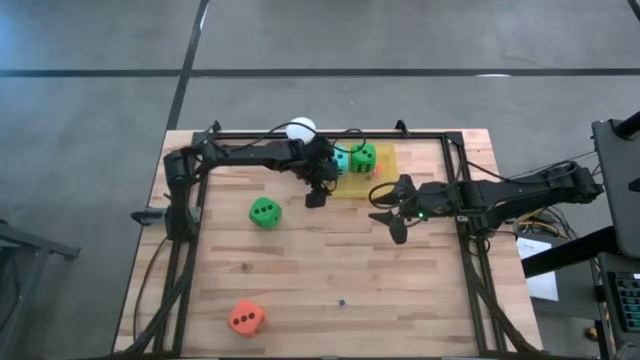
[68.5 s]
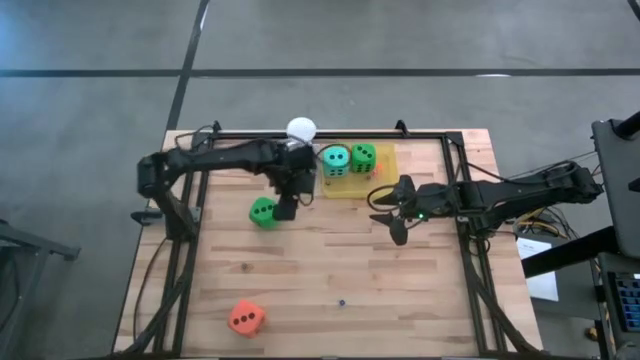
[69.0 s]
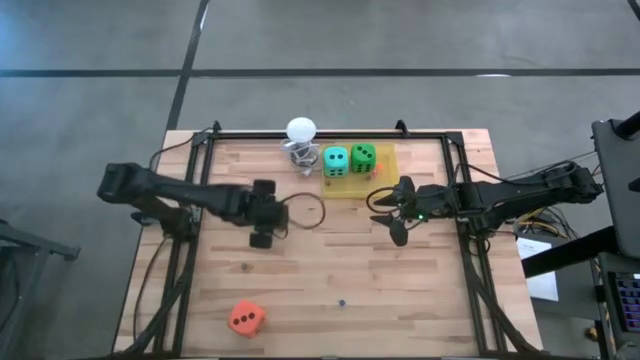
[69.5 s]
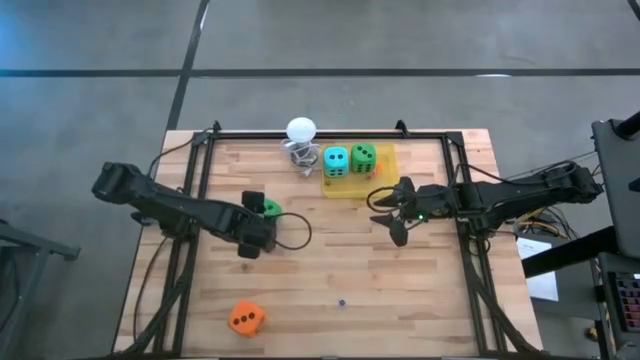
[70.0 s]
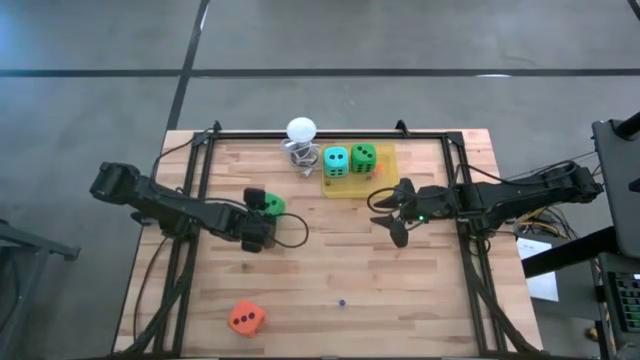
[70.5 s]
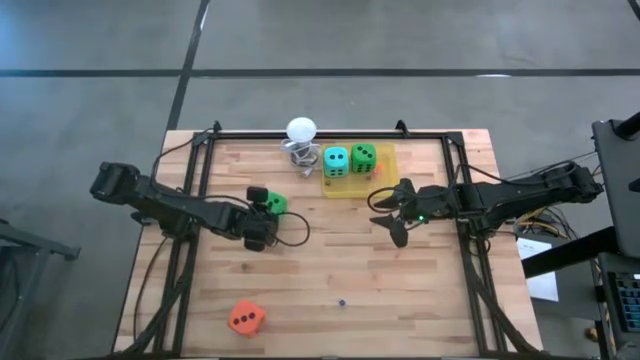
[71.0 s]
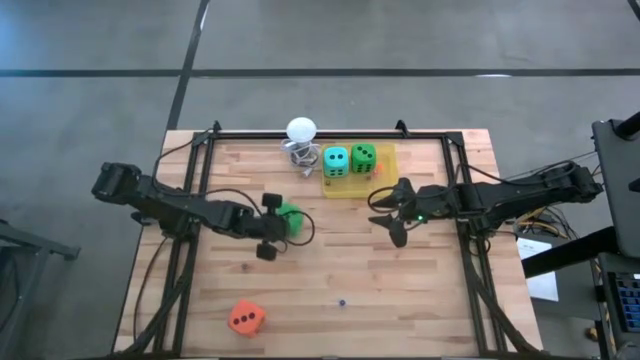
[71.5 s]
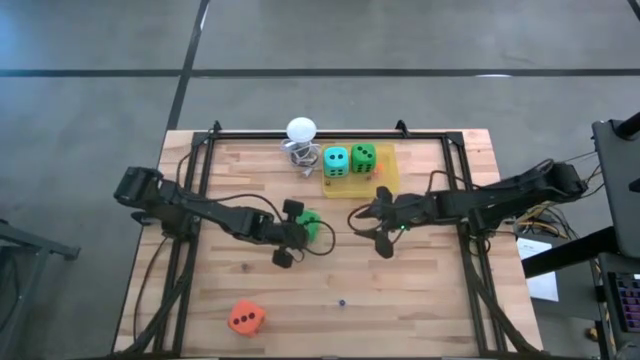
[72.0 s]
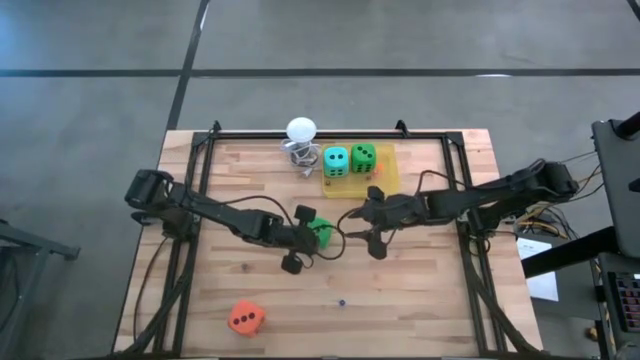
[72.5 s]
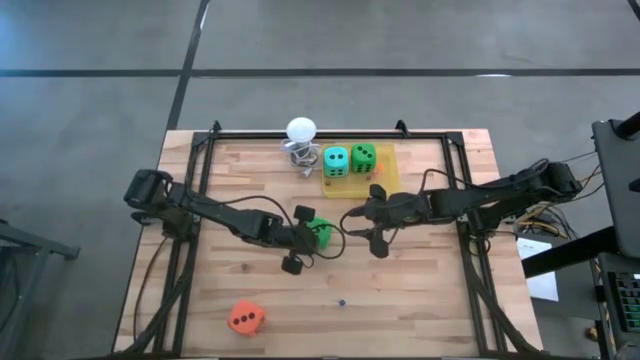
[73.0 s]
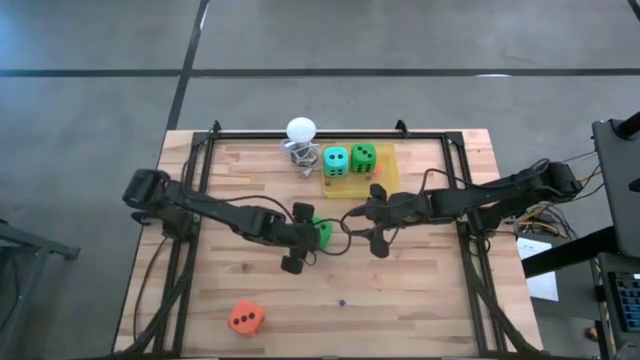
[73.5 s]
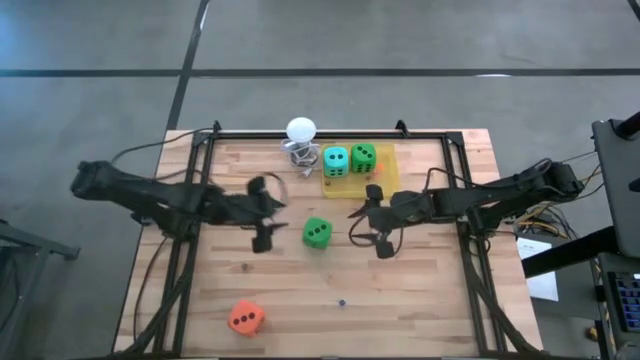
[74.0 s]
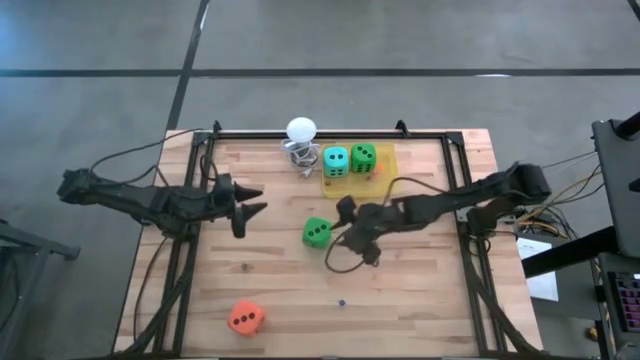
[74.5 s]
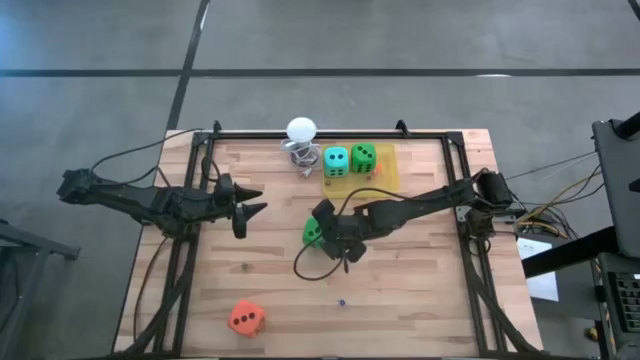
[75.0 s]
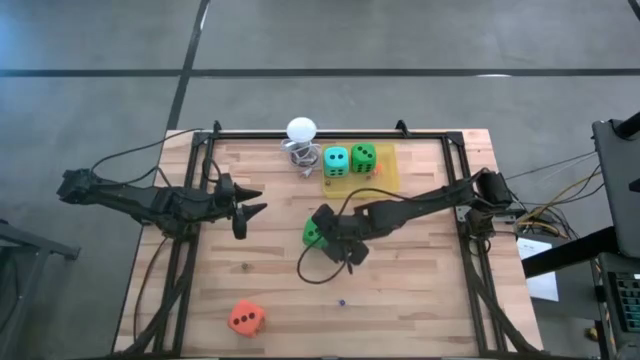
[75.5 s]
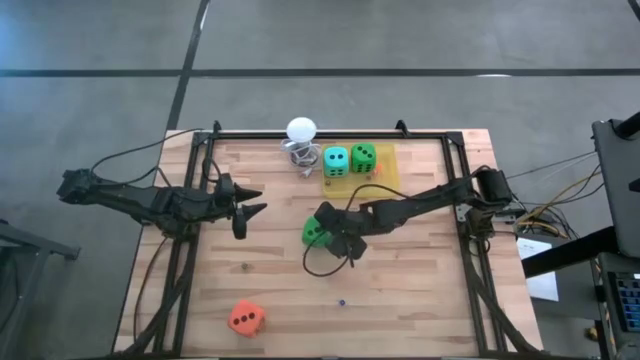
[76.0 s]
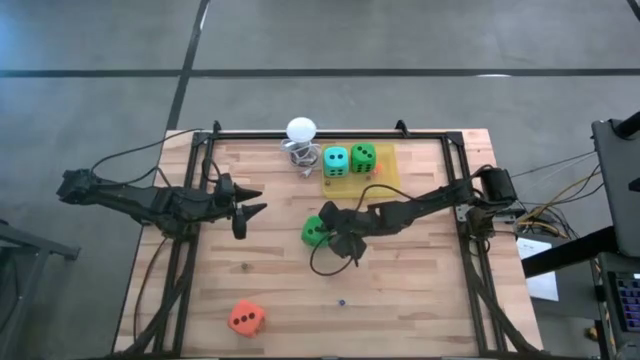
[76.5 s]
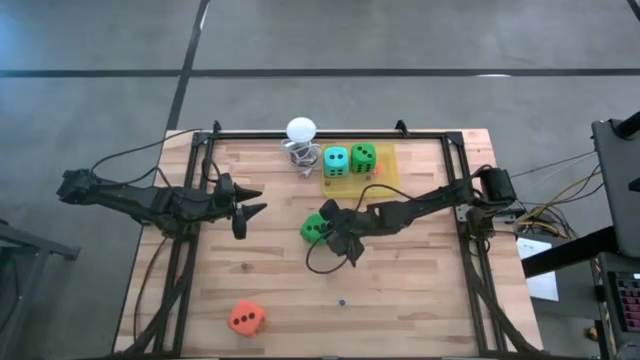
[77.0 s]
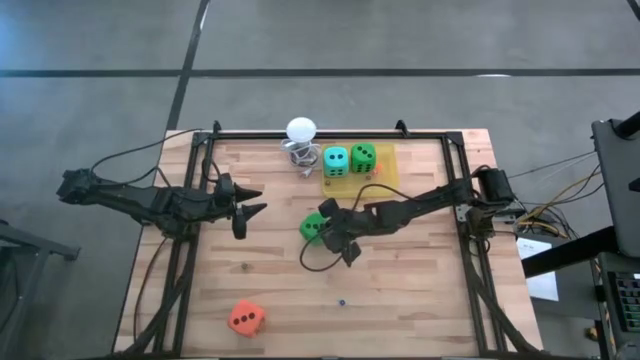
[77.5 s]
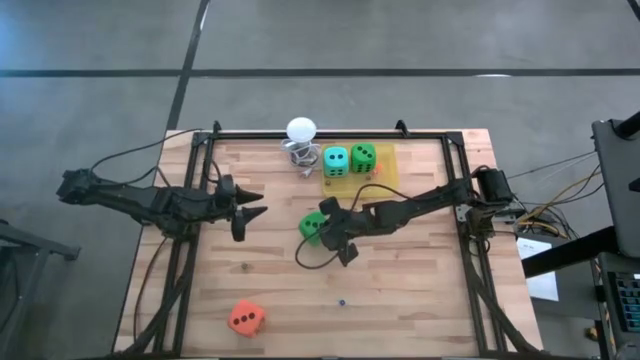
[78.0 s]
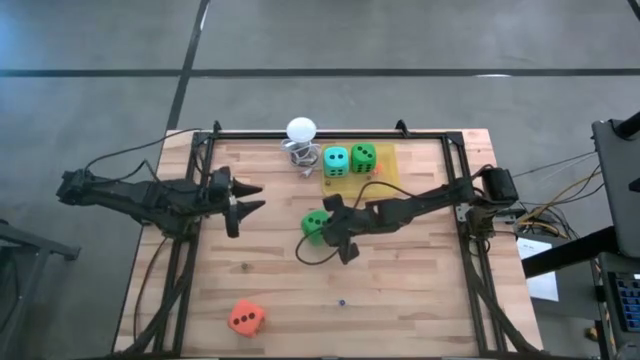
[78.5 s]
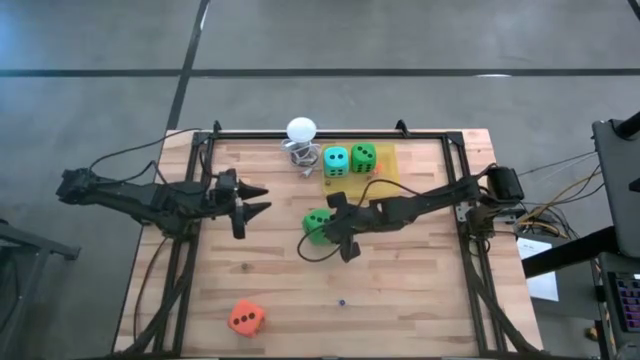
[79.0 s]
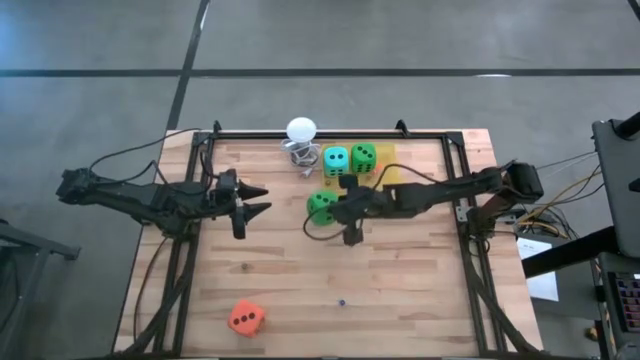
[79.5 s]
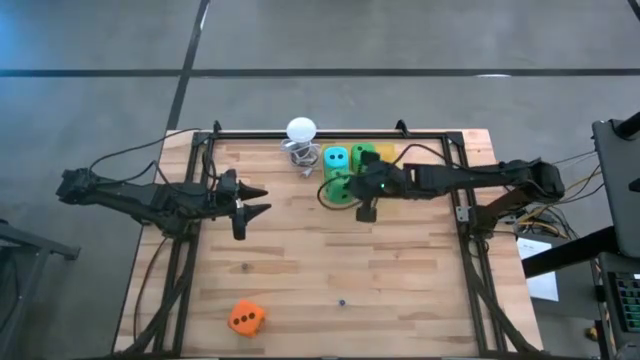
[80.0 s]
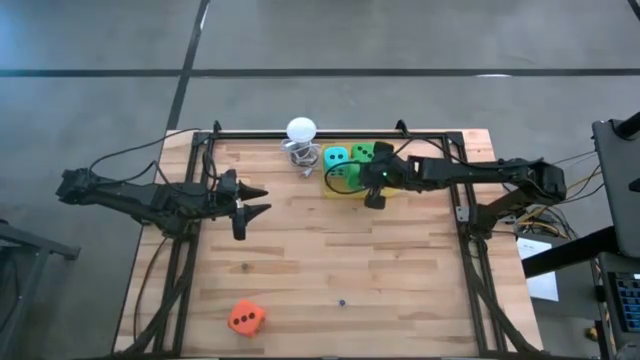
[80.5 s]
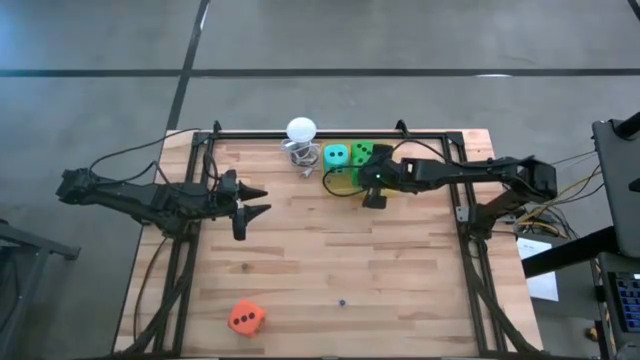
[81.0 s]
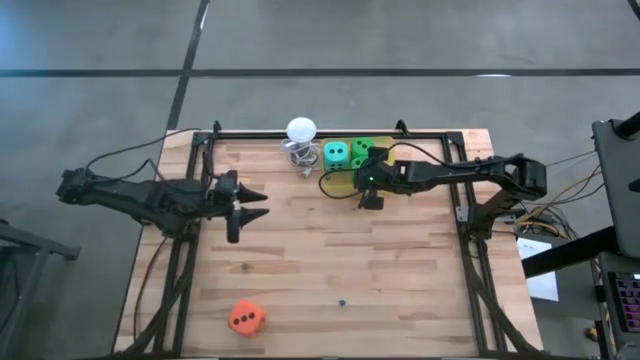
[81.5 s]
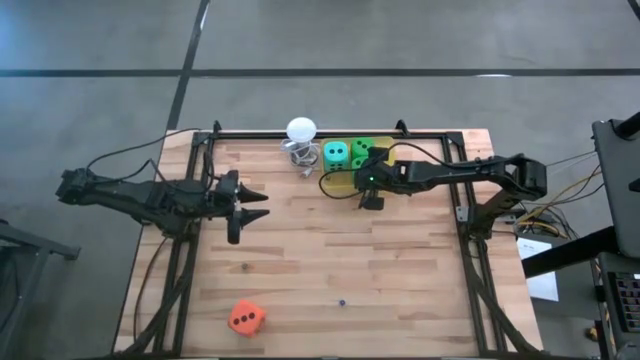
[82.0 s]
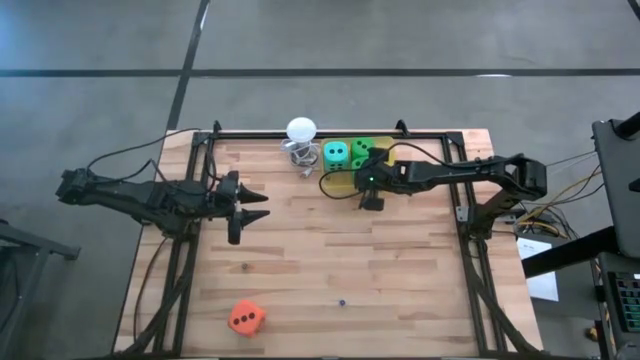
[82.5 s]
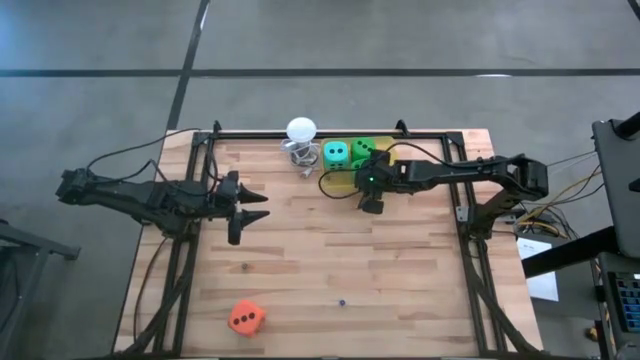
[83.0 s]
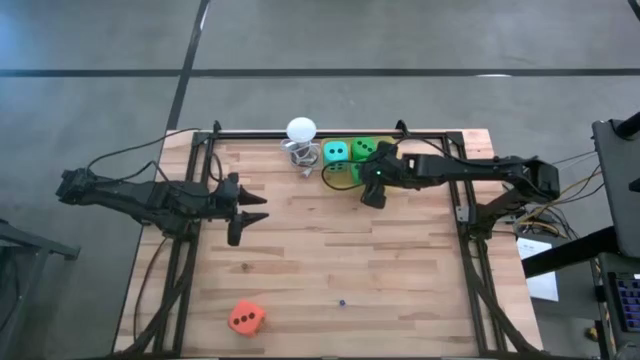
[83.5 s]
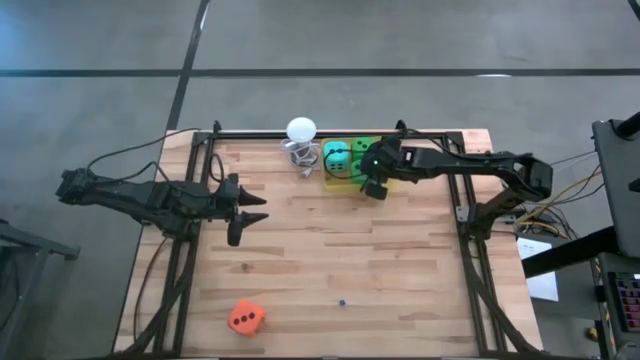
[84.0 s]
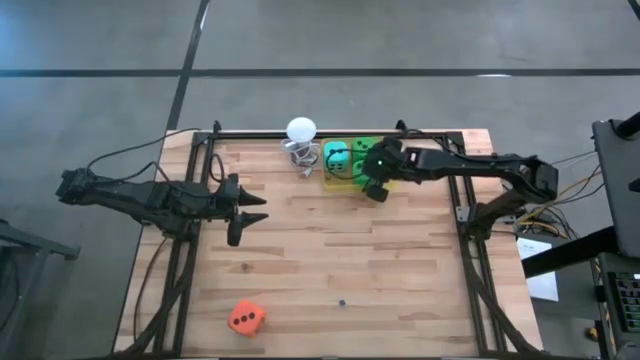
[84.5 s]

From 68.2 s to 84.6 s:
Task: Pick & Place Dice
Put the large green dice into the yellow bin

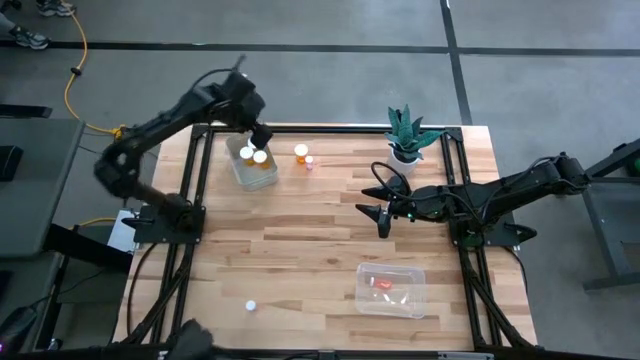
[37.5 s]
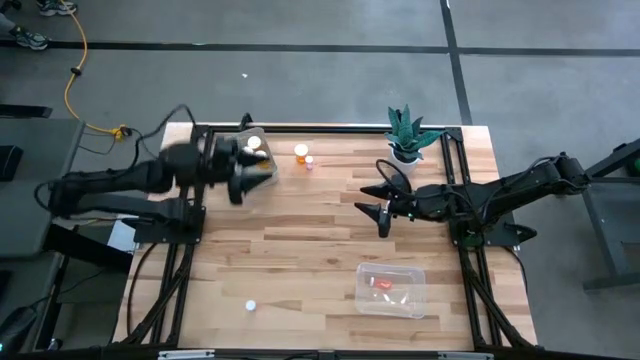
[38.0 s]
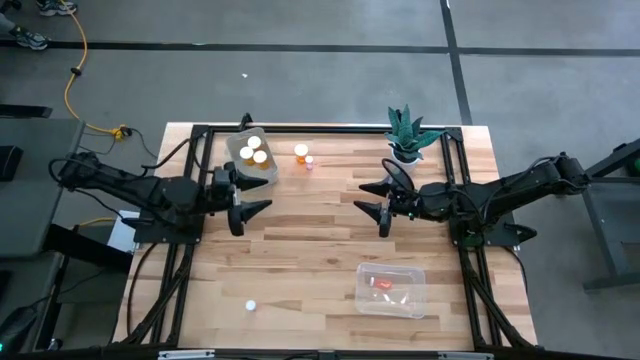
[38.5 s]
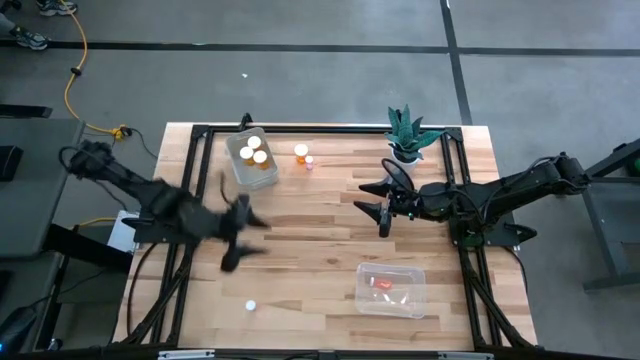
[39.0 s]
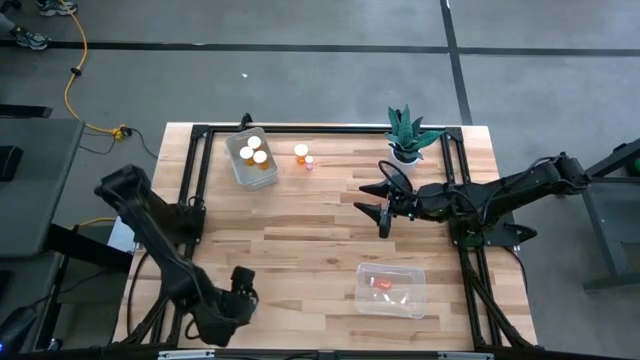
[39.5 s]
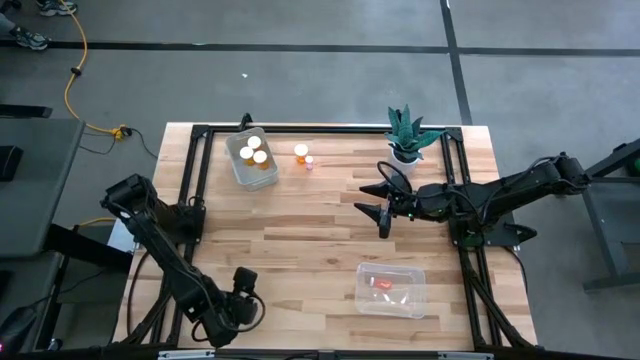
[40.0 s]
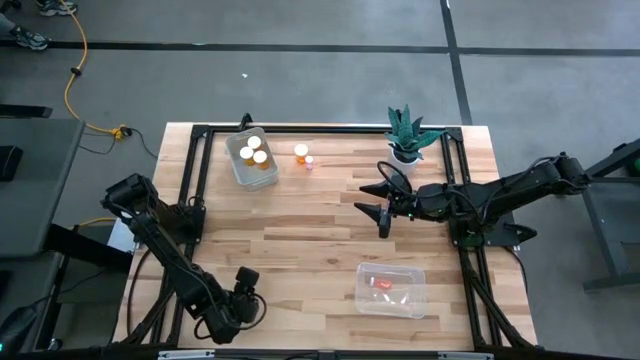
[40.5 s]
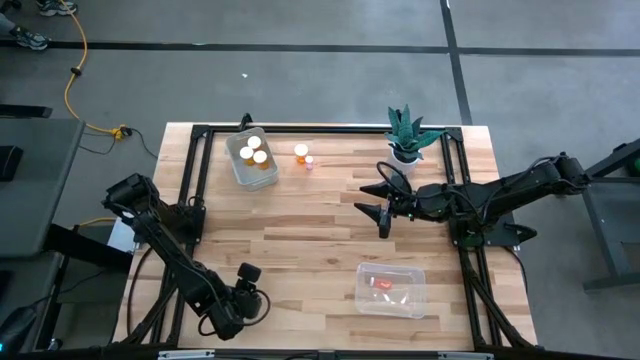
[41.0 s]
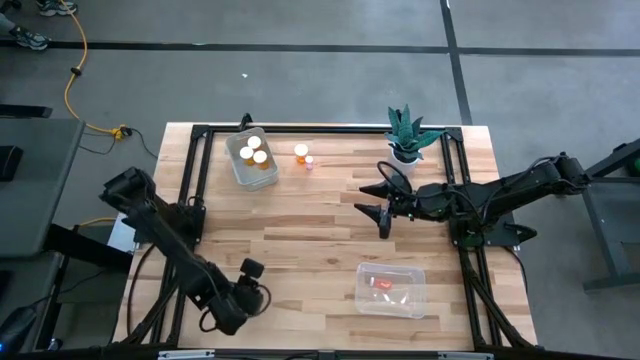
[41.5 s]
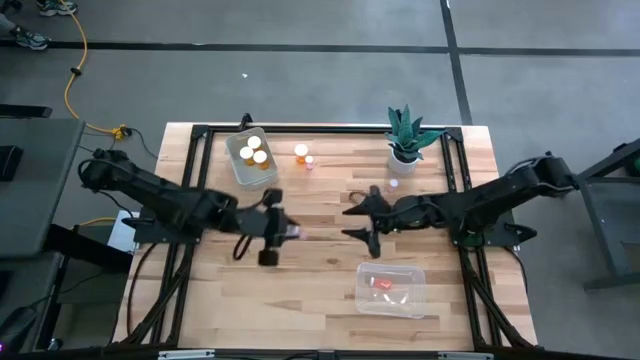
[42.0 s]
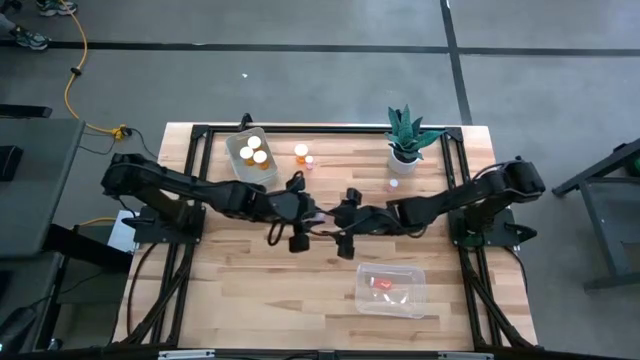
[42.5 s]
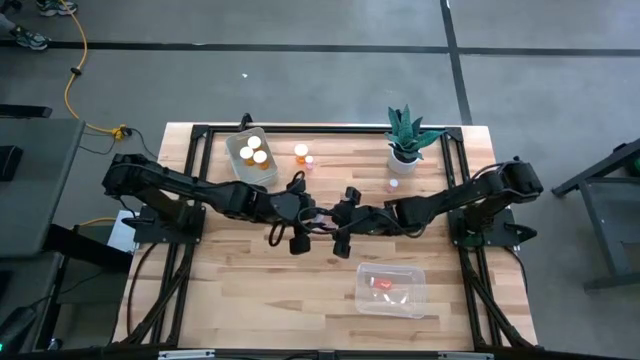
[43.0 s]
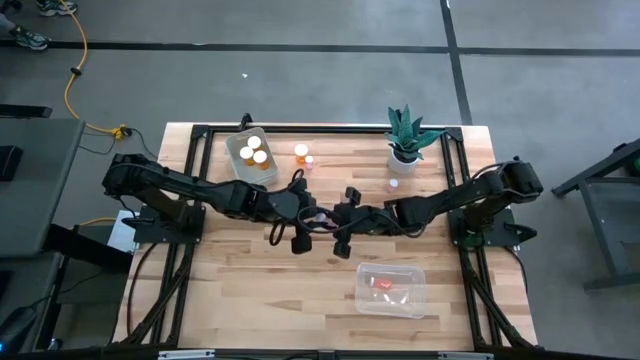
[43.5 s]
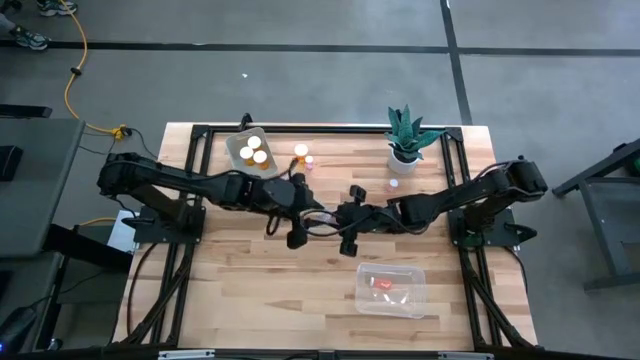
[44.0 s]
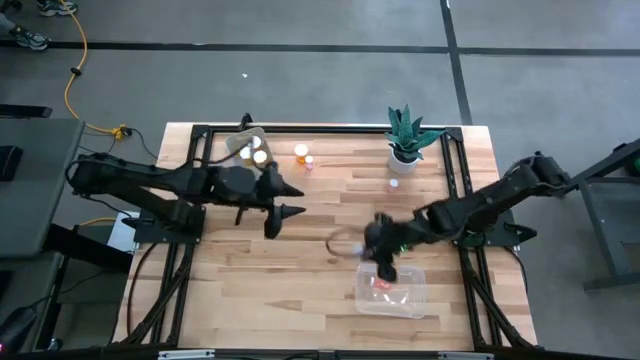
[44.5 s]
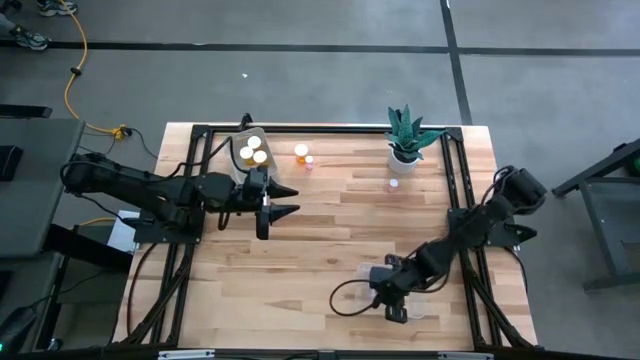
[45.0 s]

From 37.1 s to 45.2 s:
Task: Pick and place medicine bottles into bin by pill shape (circle, oval)
Put the small pink pill bottle into the transparent bin
